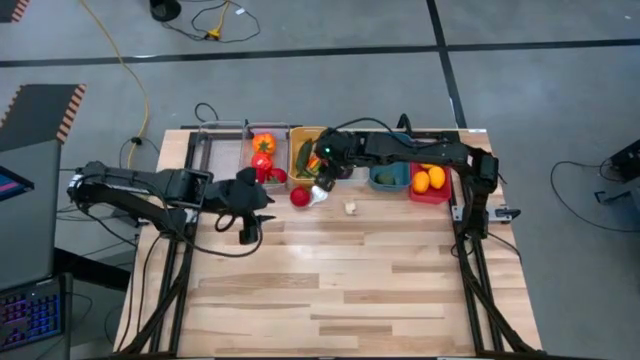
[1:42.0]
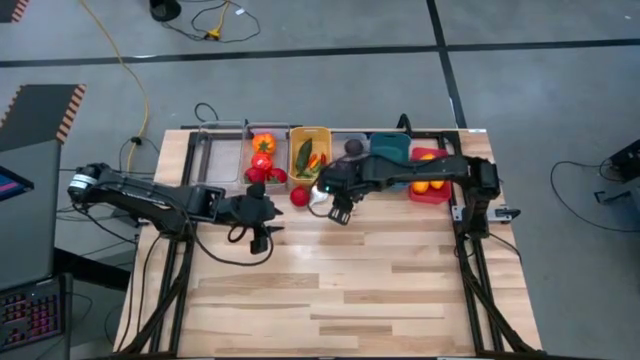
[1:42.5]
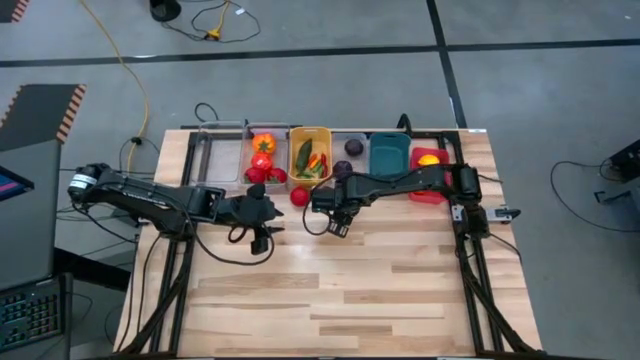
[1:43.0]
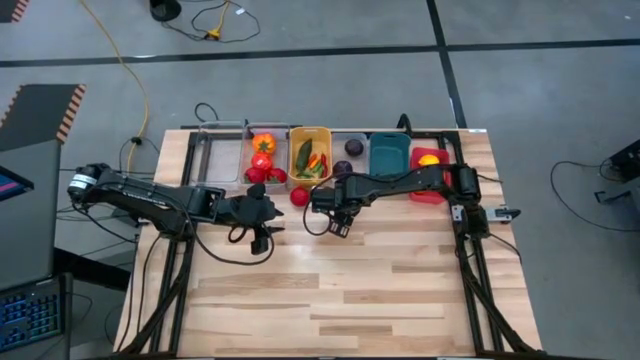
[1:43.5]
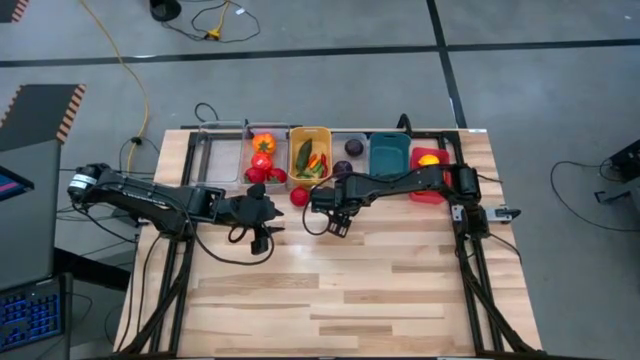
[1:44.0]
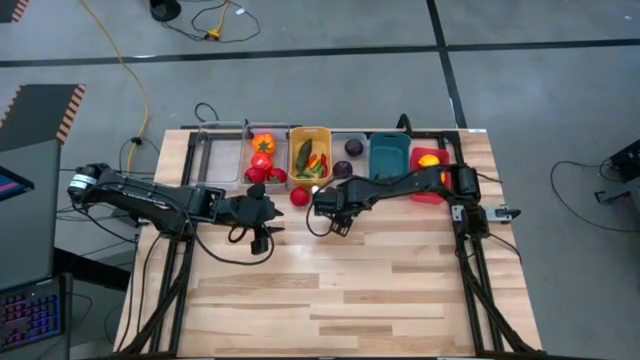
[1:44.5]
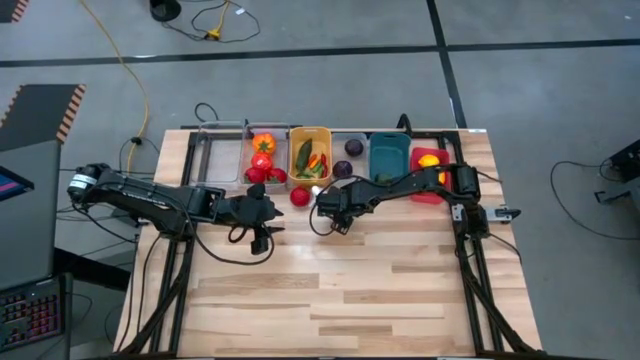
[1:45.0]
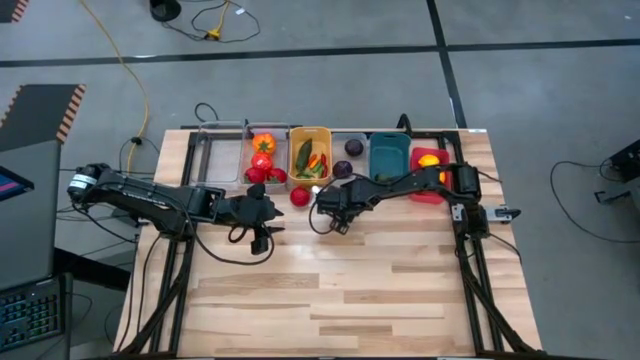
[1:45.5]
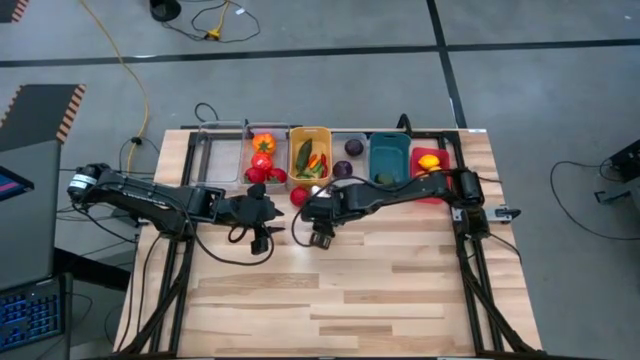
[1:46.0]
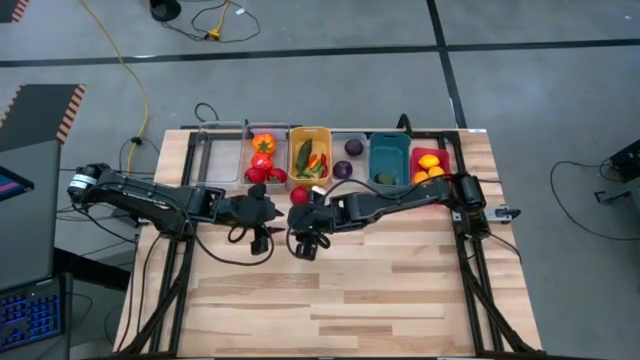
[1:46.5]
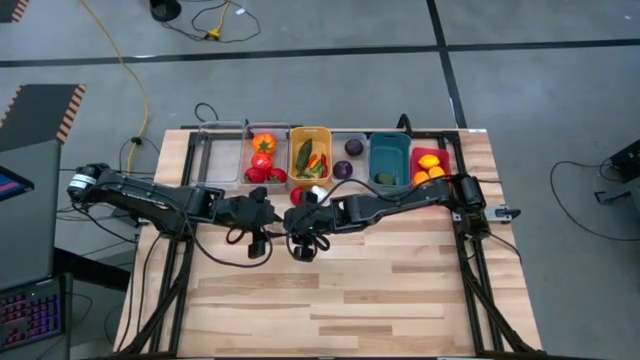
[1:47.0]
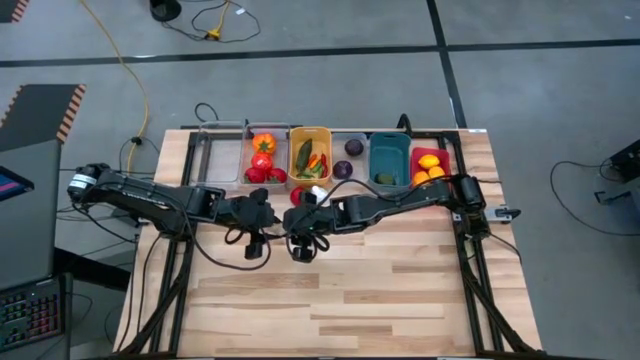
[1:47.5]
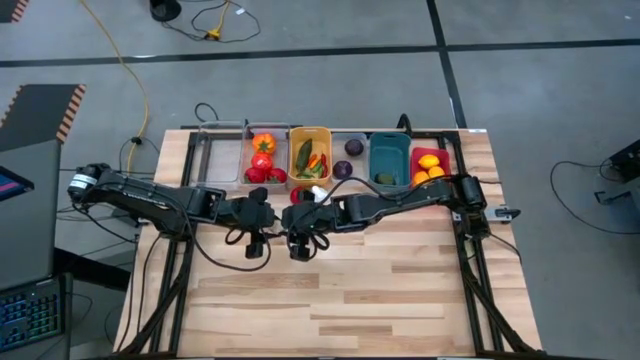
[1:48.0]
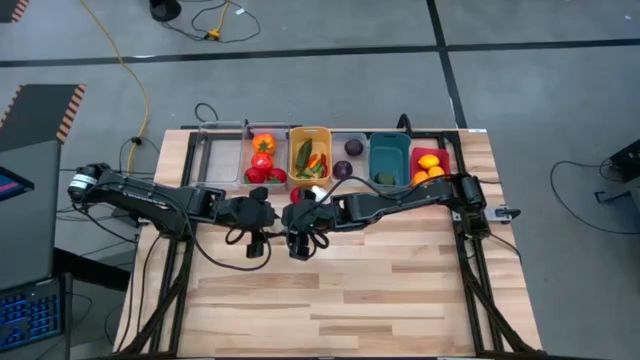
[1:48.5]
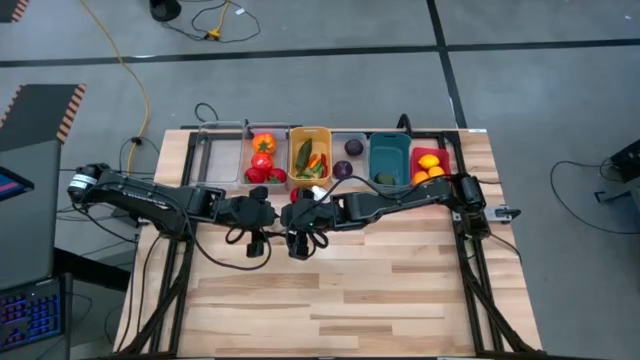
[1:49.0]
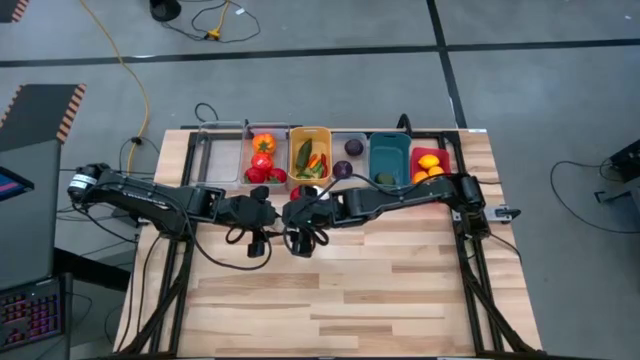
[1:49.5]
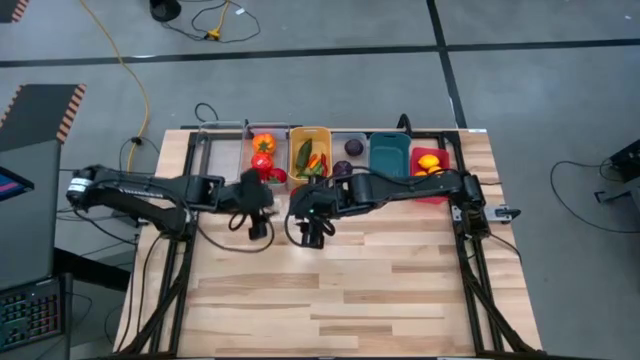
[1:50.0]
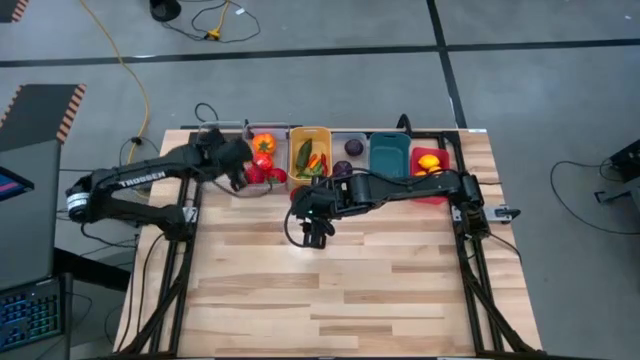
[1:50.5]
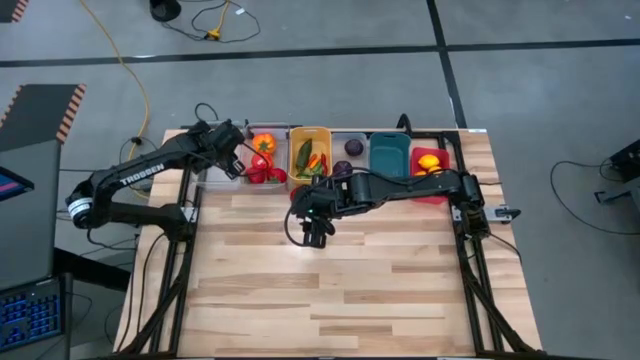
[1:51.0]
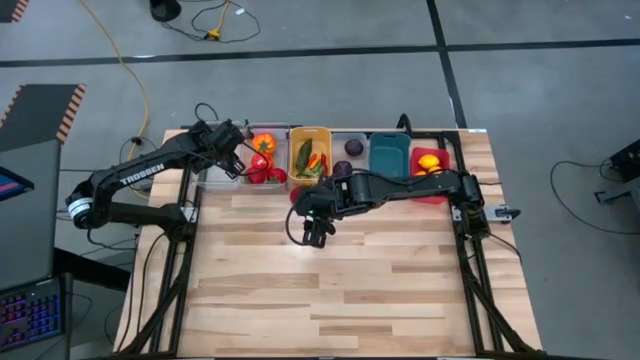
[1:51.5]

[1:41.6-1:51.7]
Task: Sort produce into baskets
Put the garlic into the left transparent bin

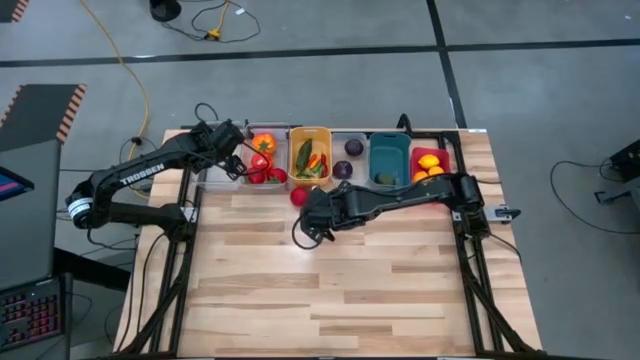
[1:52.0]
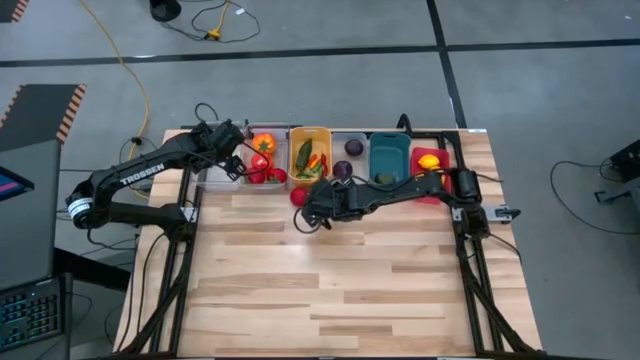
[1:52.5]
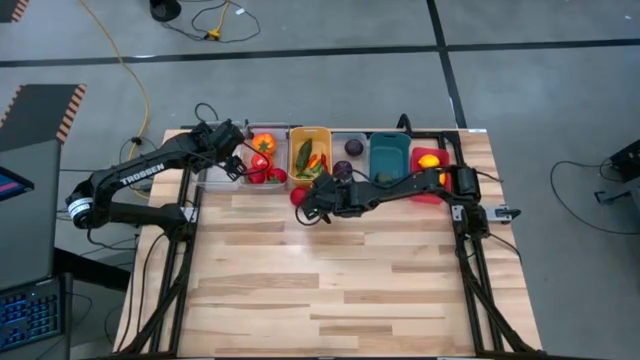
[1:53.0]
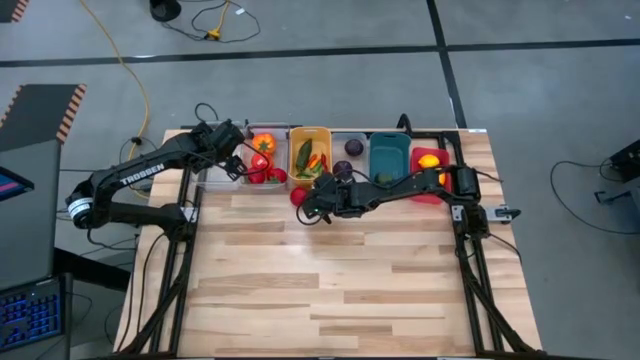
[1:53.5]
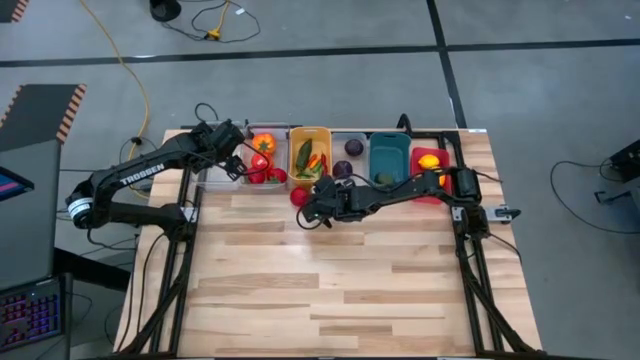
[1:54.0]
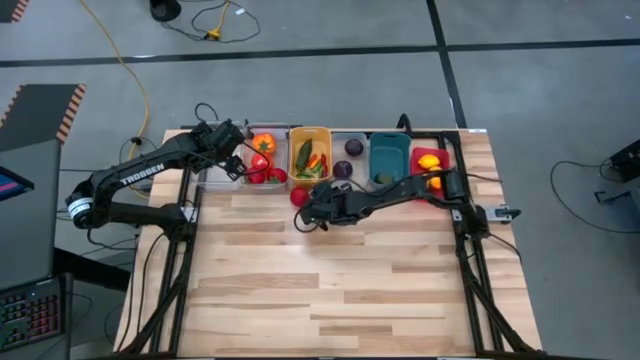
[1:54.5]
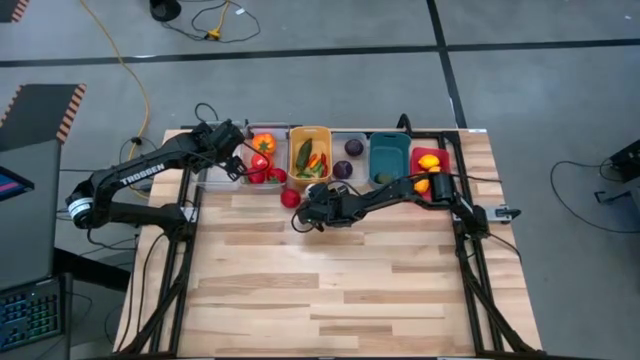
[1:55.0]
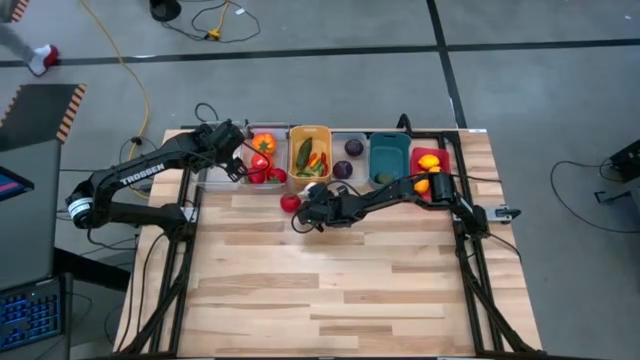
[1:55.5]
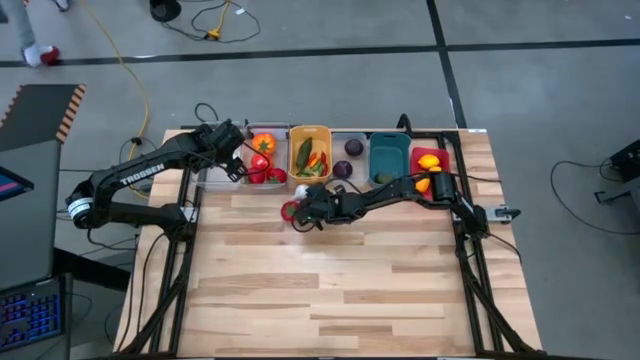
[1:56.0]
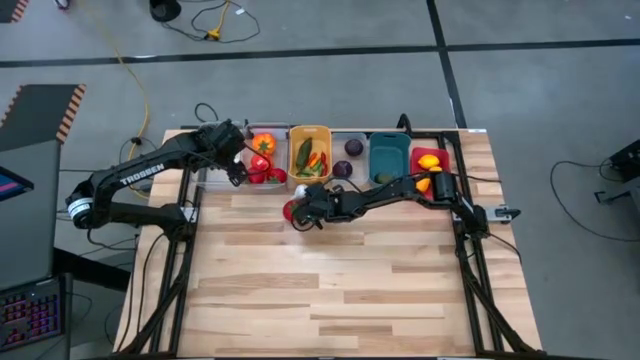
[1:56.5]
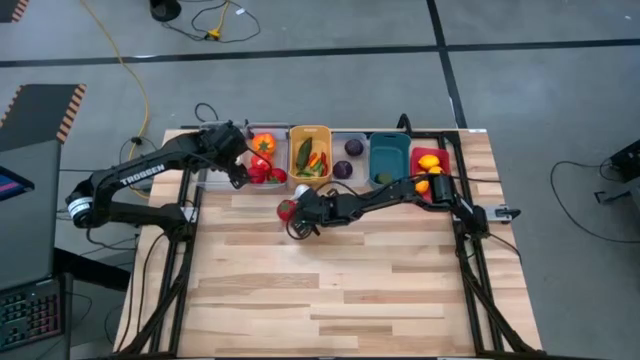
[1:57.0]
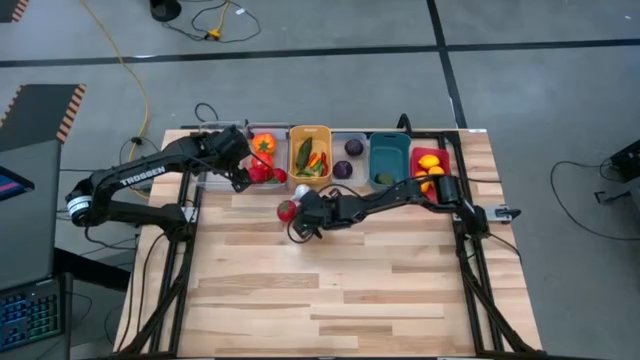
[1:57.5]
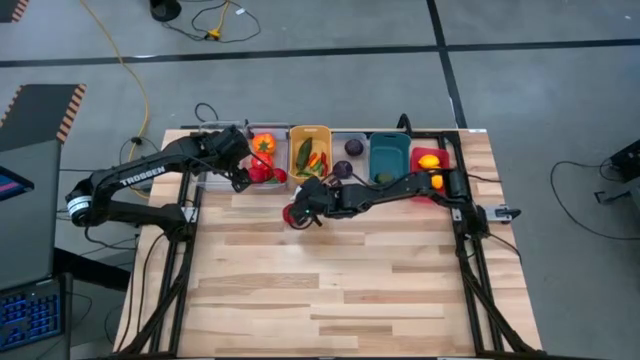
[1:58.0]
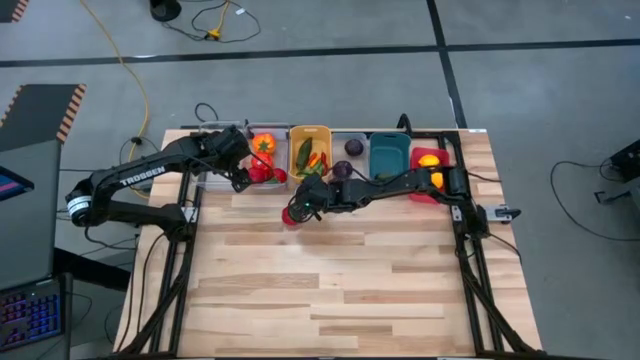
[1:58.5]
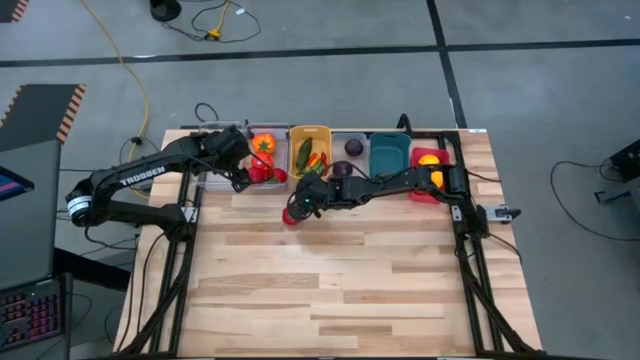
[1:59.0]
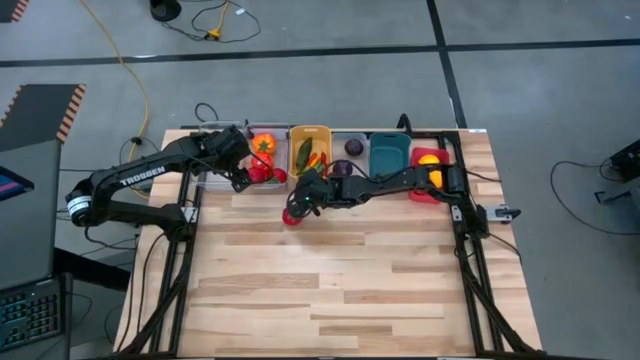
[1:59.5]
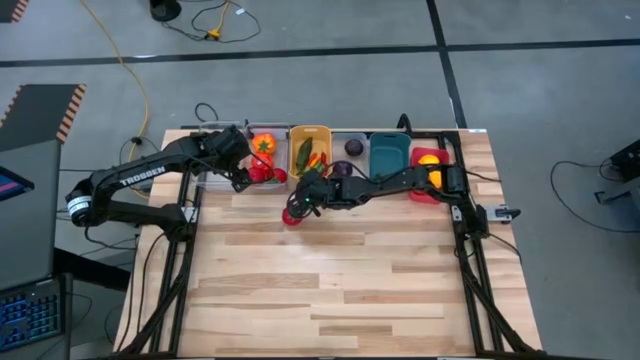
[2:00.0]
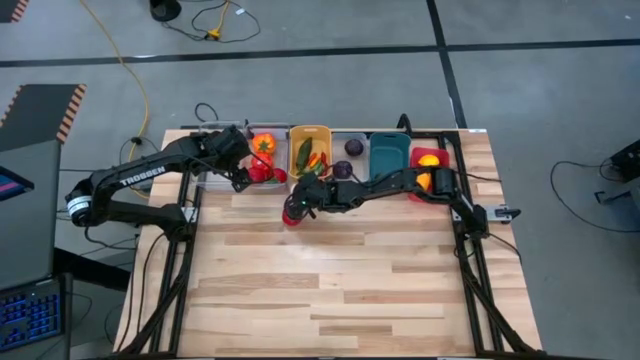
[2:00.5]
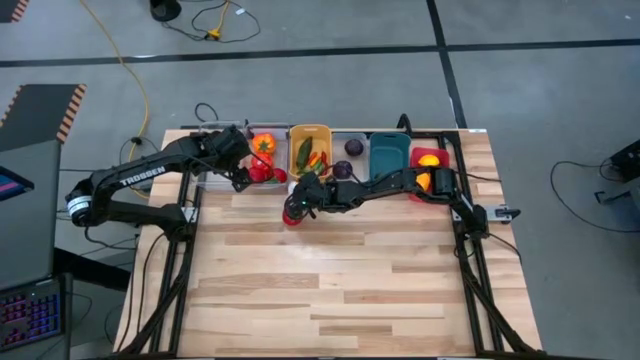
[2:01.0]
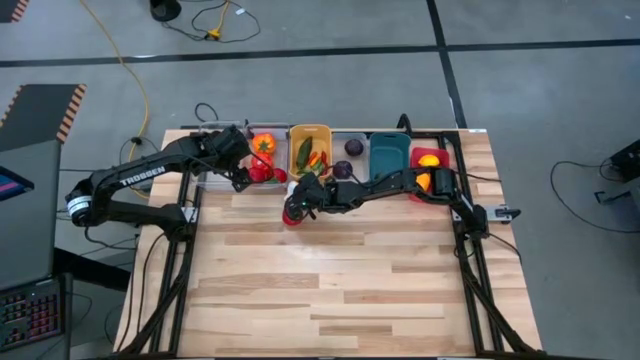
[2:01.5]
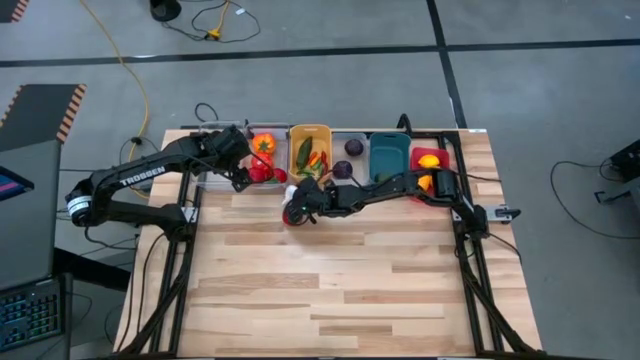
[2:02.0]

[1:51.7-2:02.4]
Put the garlic into the left transparent bin

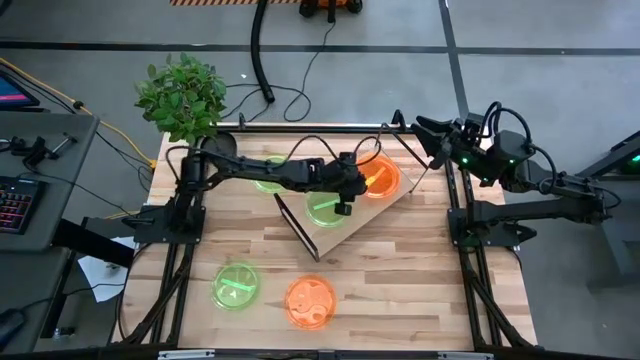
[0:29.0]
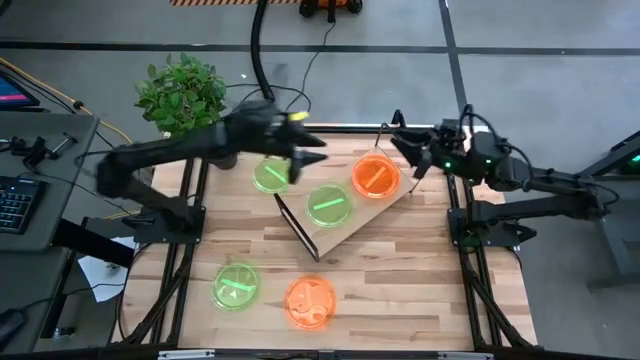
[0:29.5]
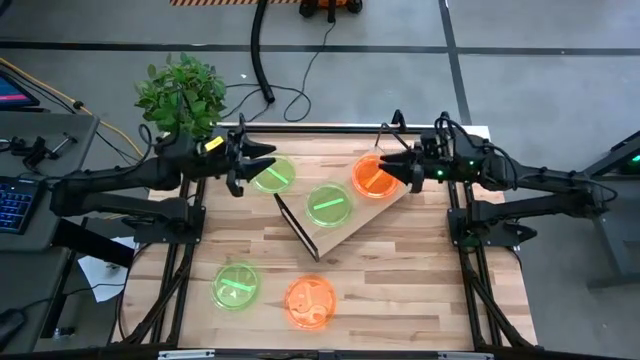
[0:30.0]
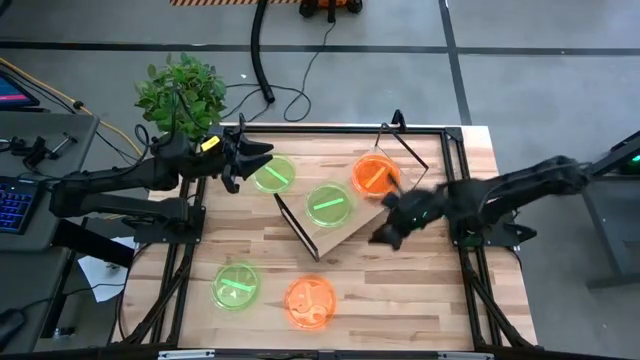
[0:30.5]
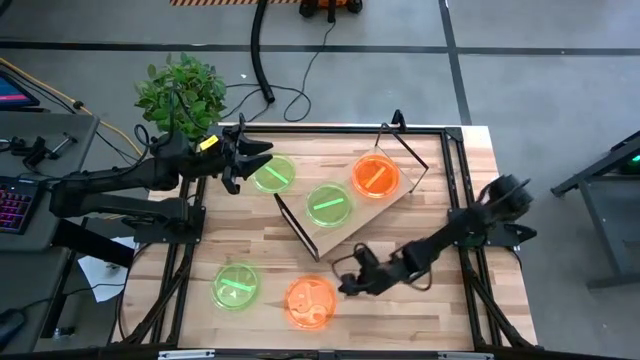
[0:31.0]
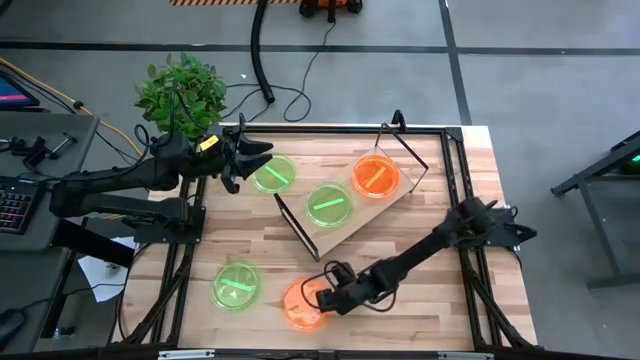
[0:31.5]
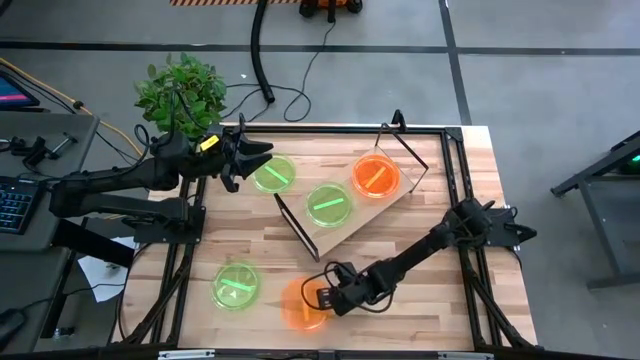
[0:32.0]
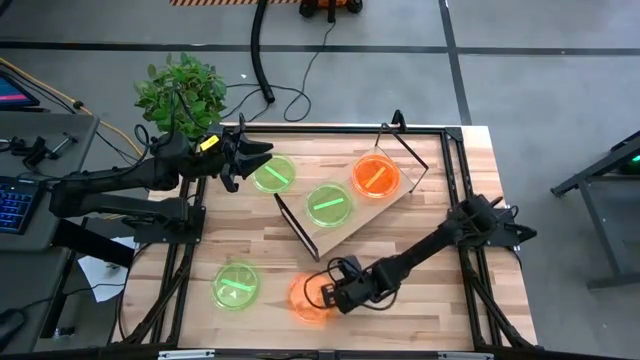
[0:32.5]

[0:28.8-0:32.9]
Task: Place and stack plates onto a shelf
Stack the orange plate on the top of the orange plate on the shelf
